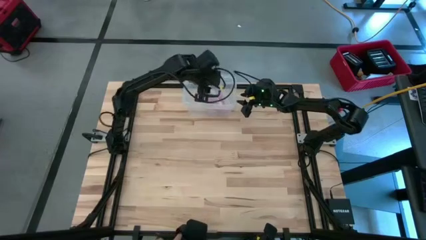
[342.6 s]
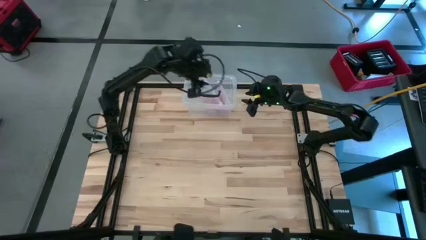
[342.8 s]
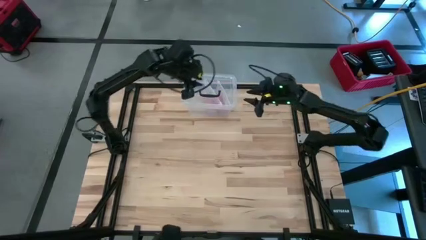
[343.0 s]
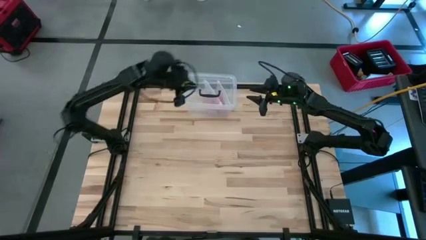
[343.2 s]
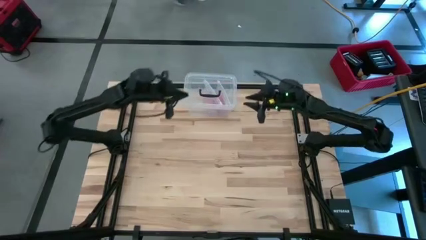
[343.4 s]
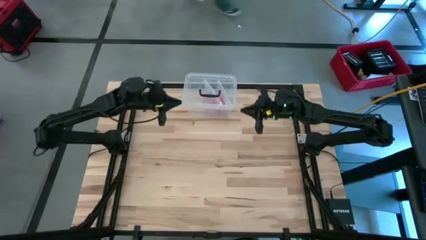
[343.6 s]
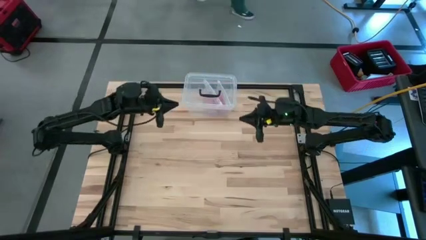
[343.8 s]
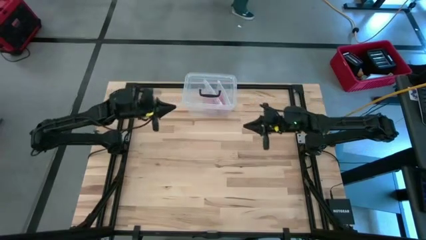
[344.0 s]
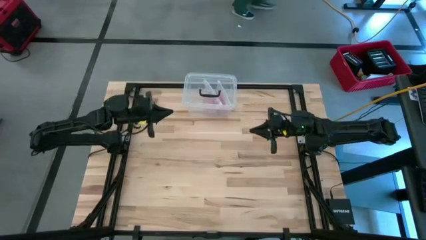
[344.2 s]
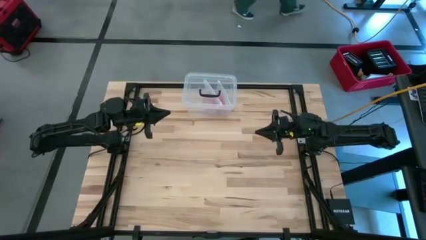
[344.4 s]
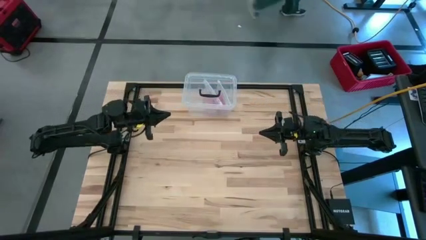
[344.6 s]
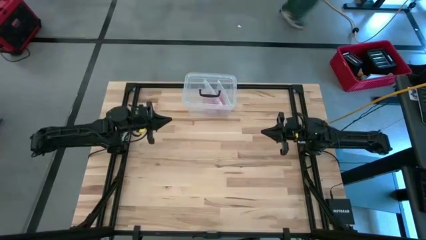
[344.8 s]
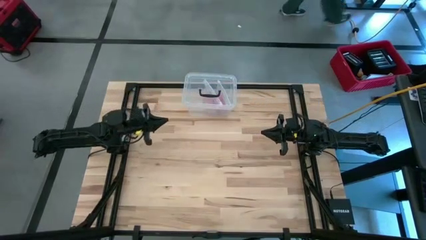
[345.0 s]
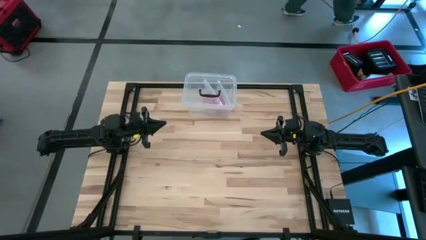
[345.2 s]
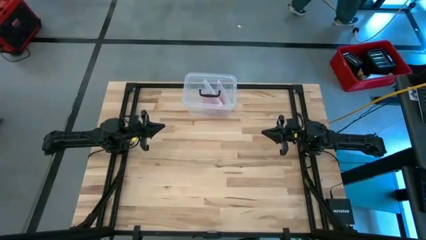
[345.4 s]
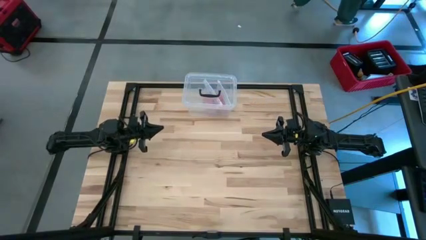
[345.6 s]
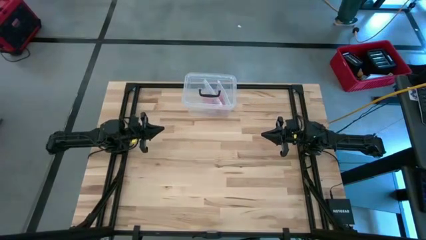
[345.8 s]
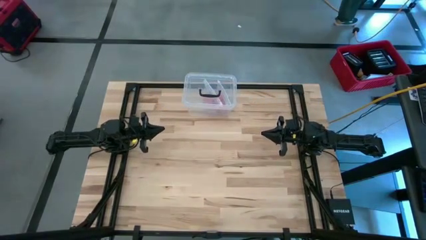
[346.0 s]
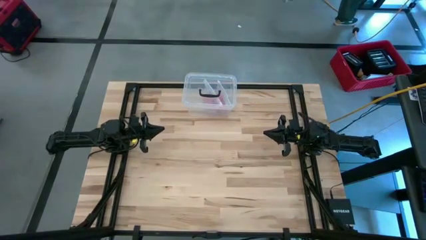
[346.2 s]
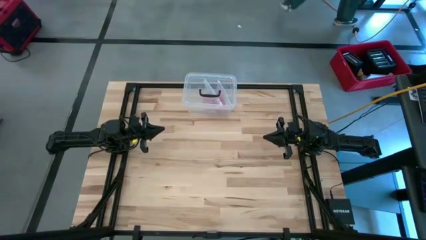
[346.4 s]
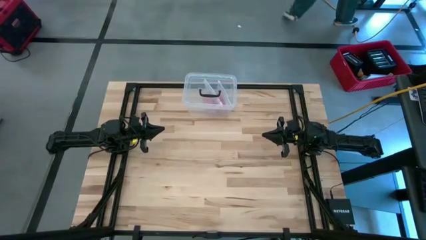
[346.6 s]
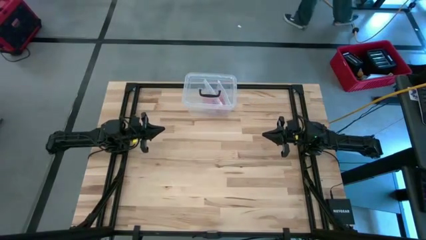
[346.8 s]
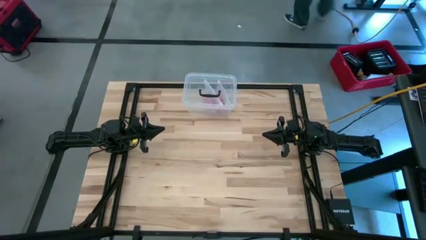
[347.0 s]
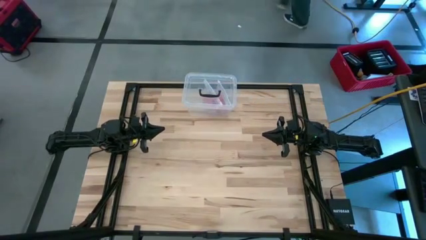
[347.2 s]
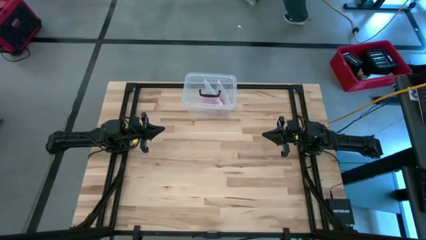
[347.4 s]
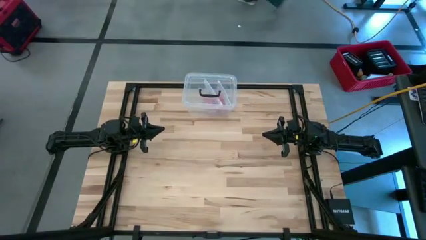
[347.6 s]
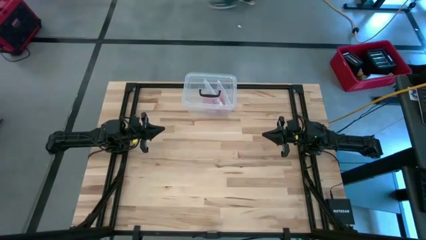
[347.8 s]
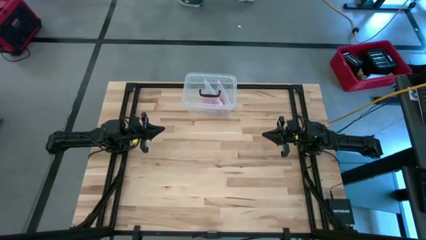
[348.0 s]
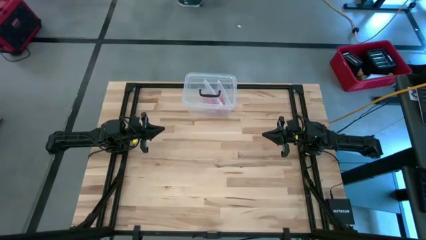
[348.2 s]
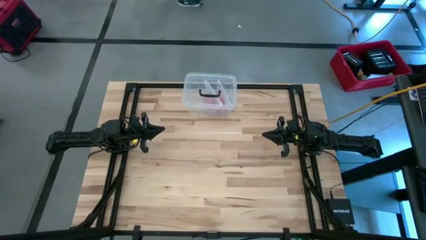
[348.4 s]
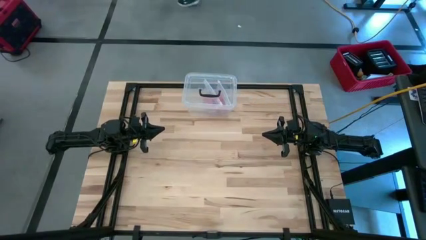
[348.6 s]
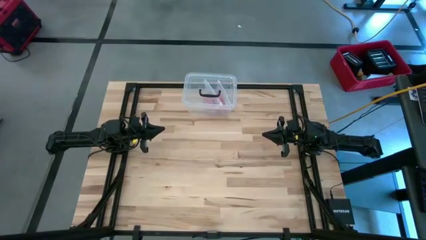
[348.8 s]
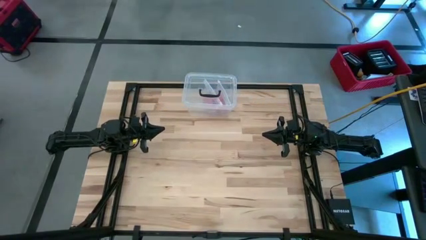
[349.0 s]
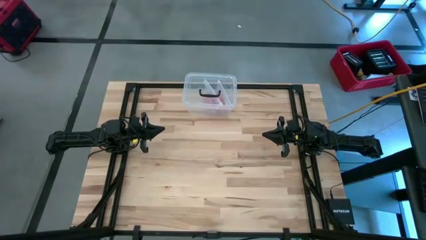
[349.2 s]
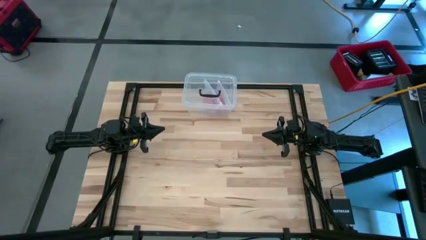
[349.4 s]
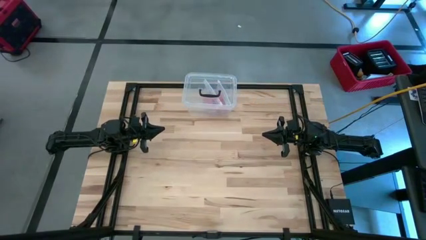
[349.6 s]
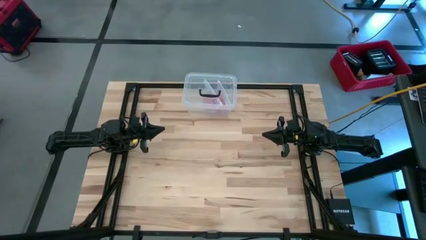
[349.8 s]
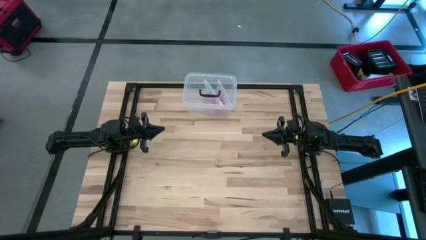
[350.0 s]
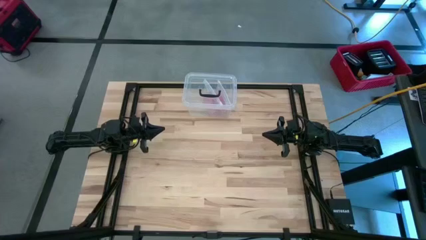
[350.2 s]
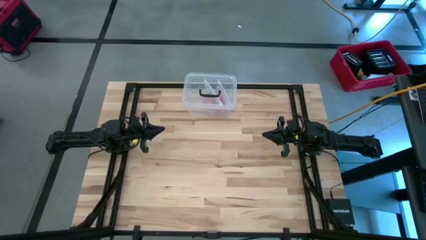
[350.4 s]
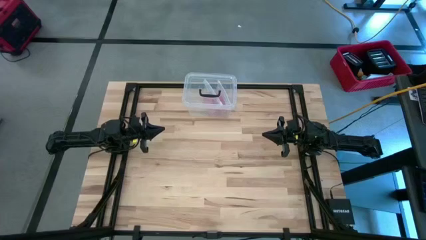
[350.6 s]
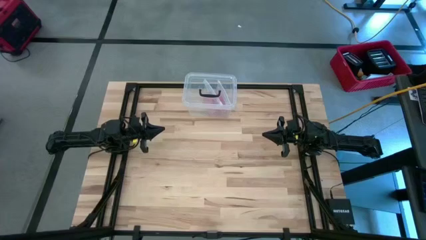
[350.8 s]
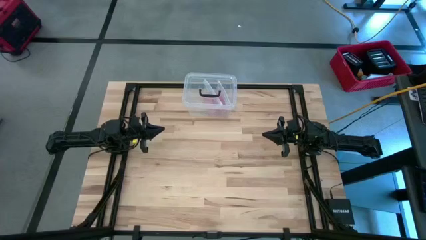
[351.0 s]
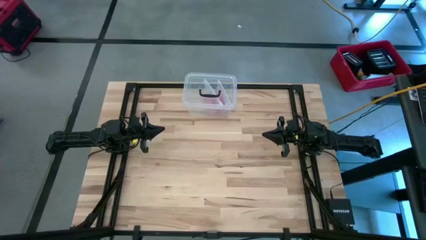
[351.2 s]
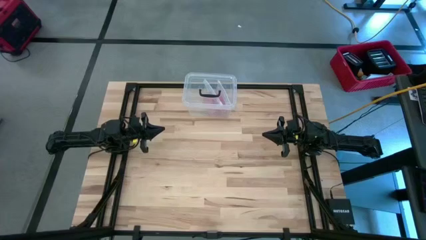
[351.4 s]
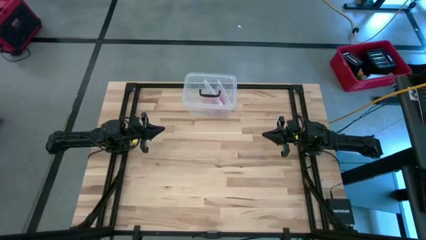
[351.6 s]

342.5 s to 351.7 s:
Task: Roll bandage
Return to Home Position

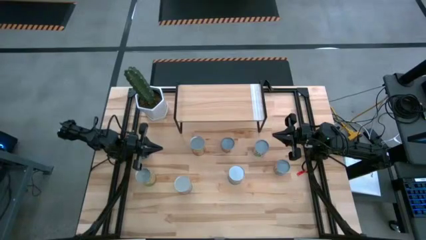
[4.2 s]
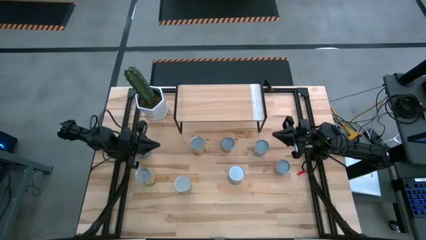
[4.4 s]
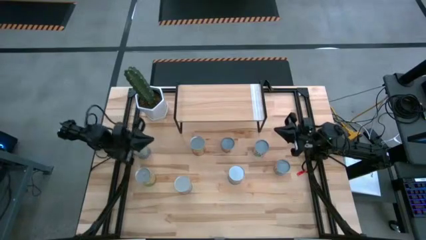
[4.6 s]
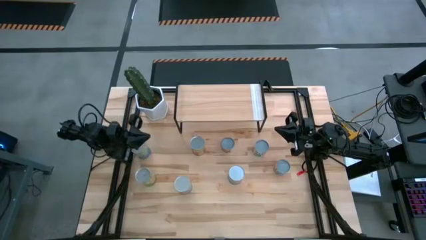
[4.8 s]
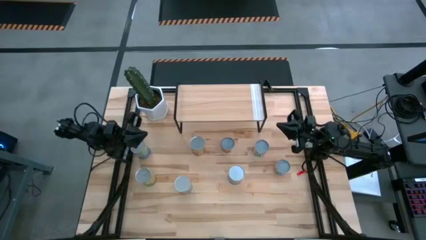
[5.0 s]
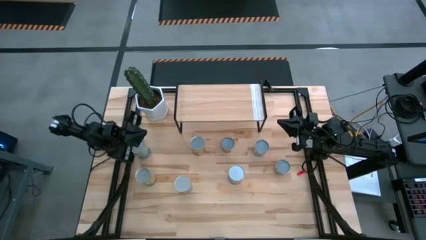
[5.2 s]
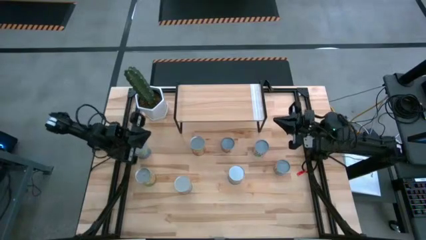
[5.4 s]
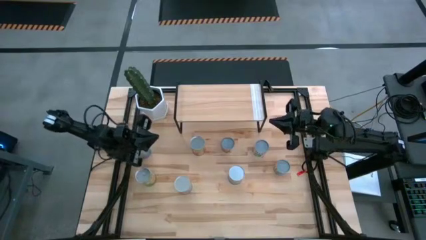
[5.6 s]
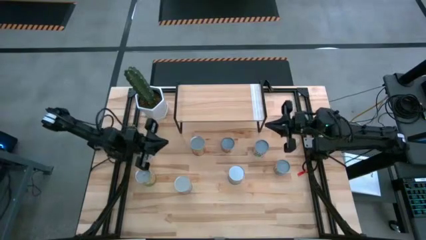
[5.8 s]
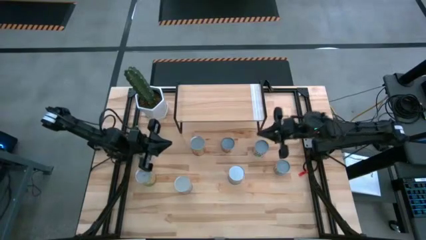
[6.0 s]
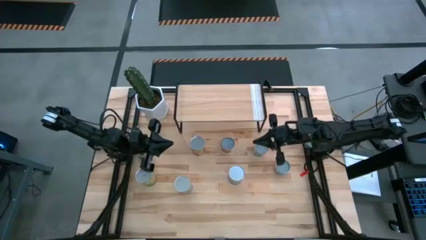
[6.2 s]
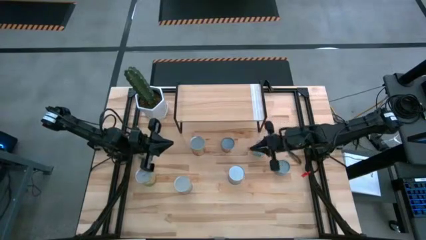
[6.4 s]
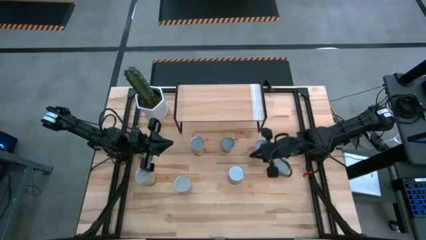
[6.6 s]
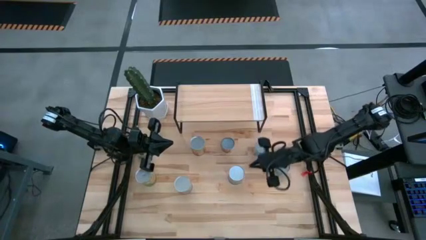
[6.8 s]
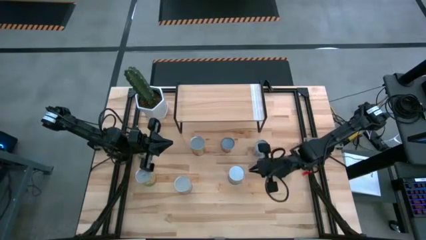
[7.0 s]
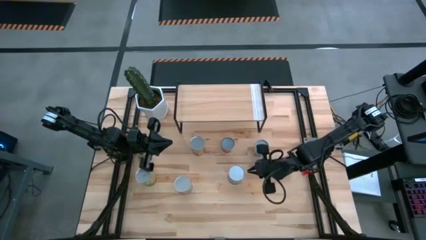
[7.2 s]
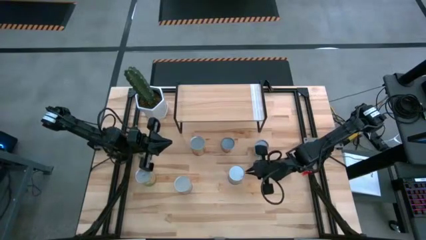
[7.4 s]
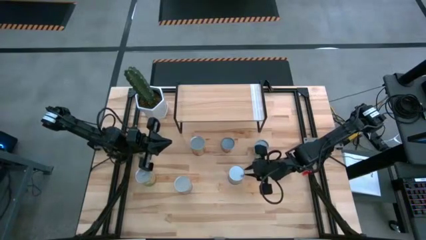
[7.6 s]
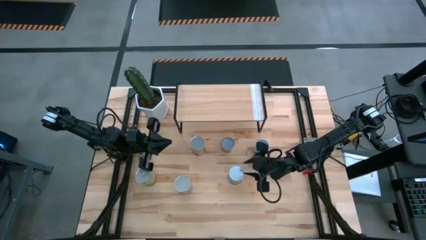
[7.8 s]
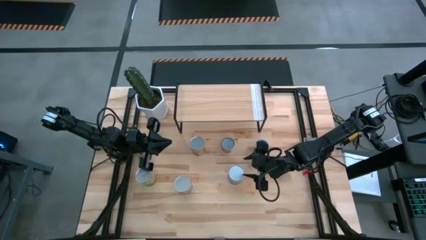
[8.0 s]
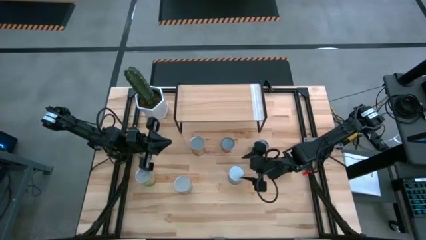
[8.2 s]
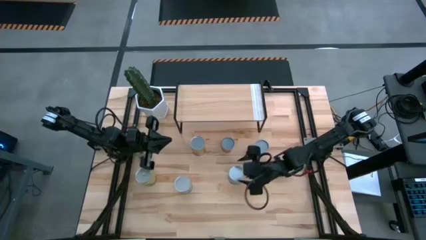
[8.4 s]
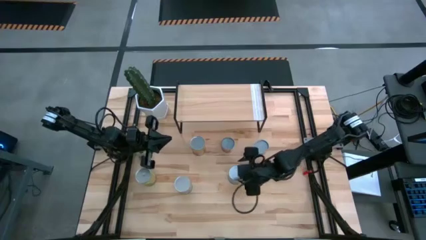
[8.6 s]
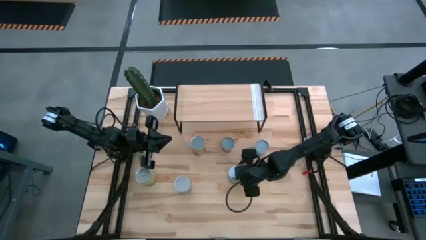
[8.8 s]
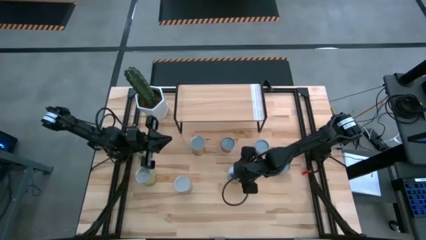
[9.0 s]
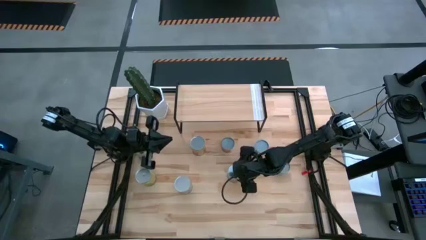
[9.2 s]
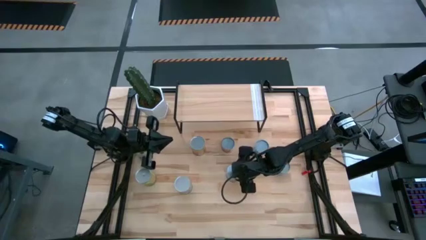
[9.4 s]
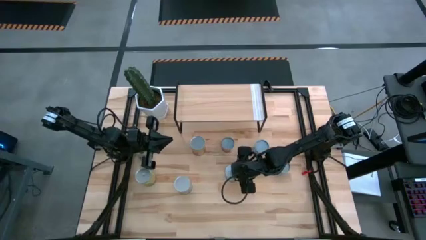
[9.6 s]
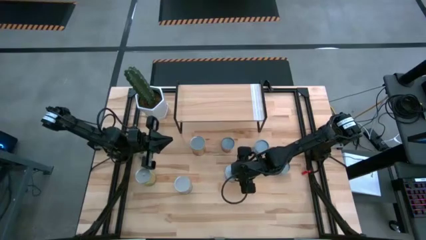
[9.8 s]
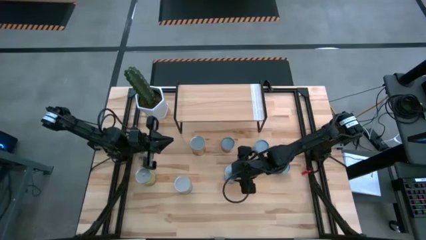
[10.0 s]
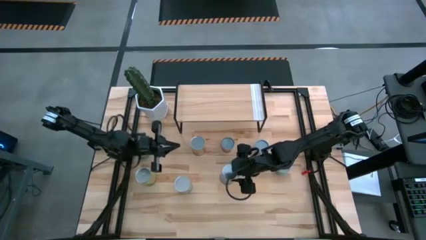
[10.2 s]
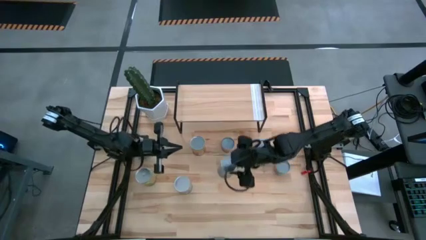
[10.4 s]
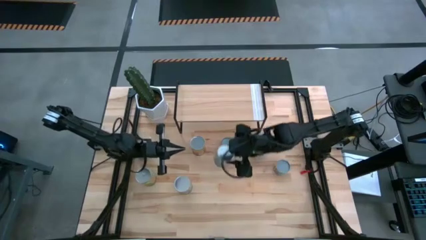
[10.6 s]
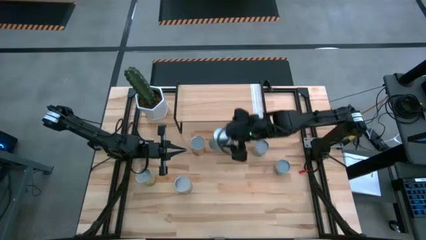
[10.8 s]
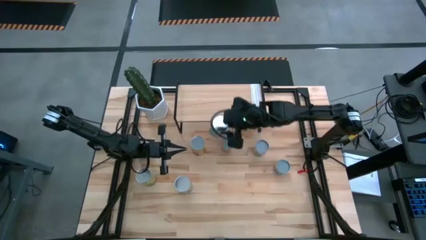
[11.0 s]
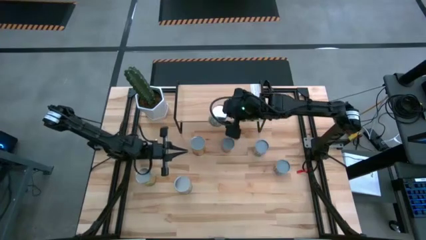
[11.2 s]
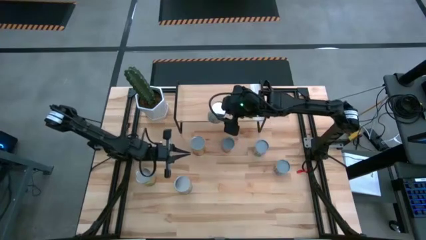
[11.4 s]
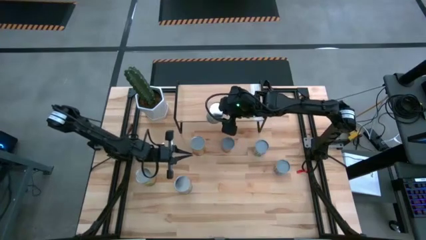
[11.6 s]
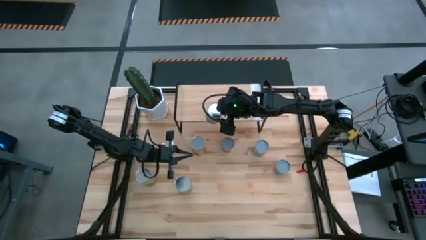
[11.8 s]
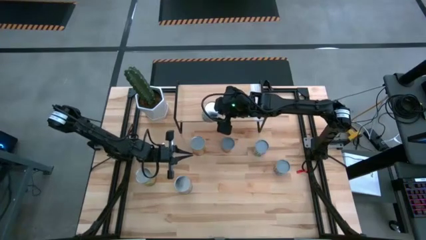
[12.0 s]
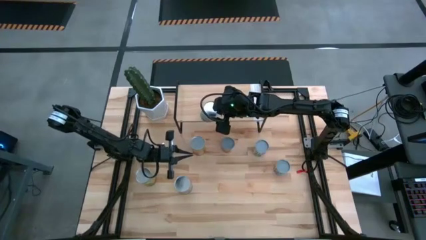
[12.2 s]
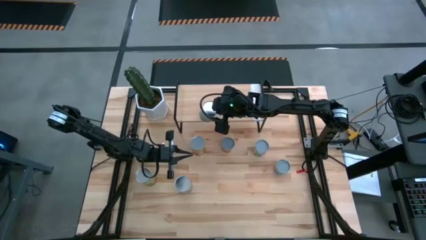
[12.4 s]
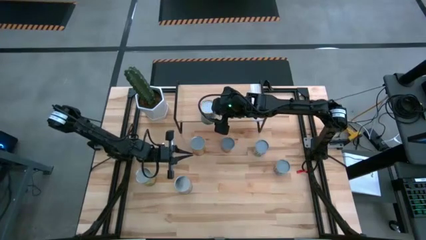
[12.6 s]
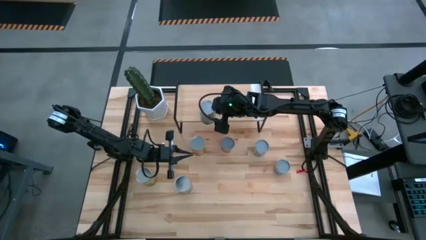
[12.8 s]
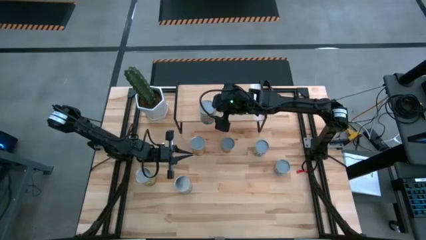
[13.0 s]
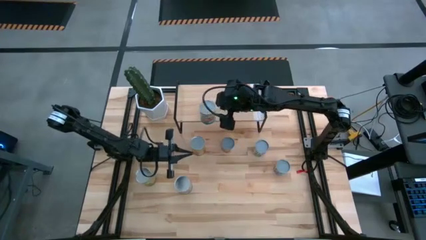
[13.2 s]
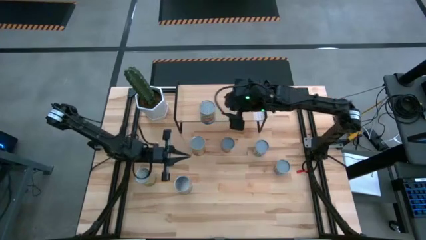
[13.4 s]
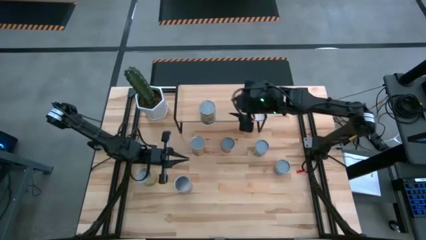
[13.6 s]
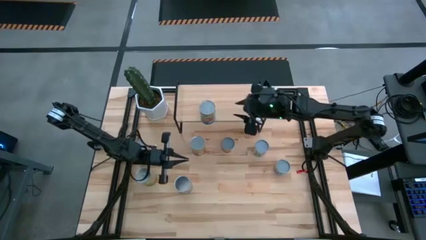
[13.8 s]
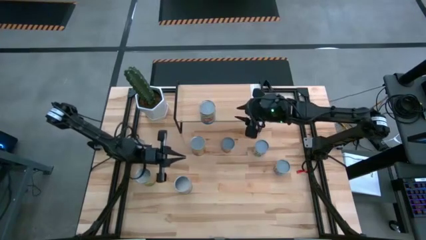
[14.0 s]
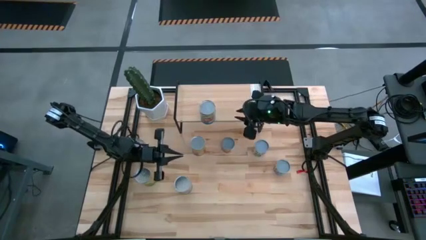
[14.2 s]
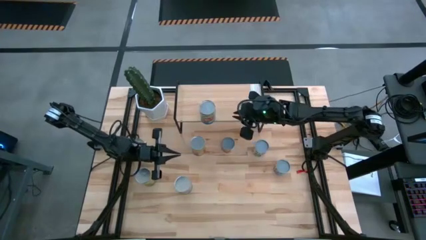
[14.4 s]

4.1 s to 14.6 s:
Task: Pick and place cans onto a shelf
Put the canned tomatoes on the shelf
